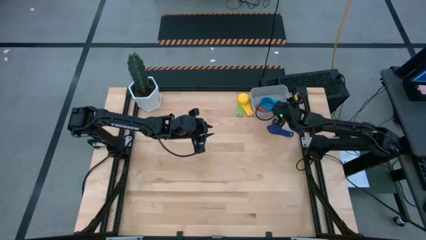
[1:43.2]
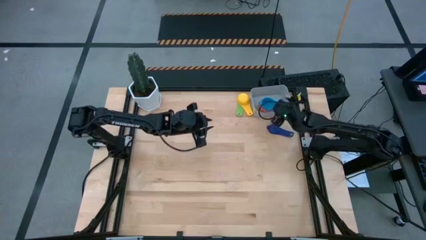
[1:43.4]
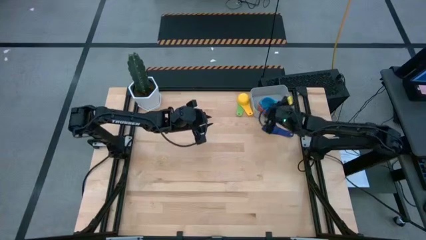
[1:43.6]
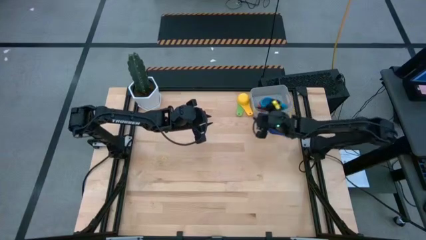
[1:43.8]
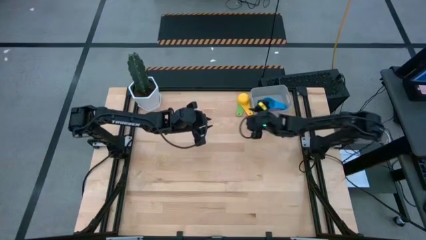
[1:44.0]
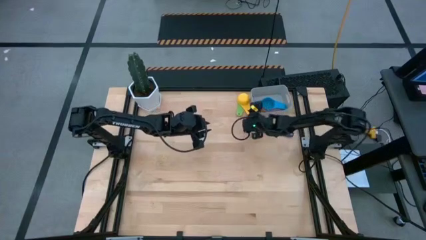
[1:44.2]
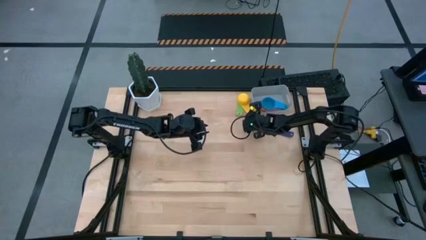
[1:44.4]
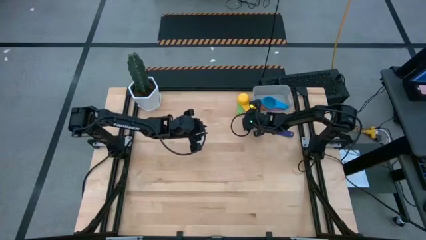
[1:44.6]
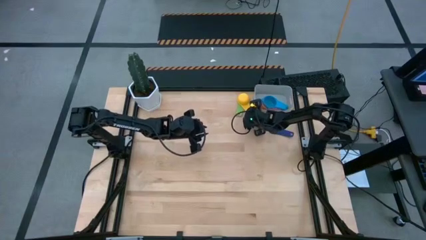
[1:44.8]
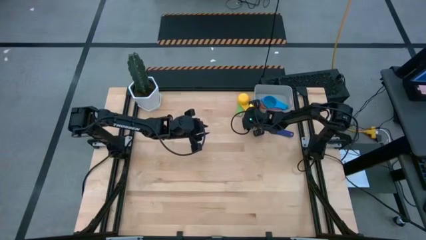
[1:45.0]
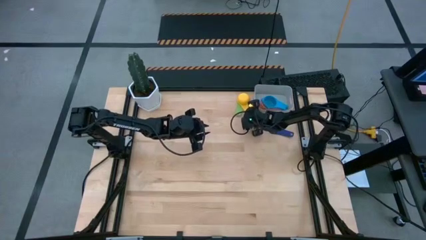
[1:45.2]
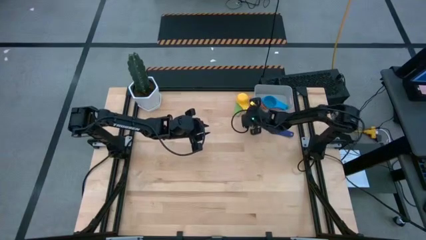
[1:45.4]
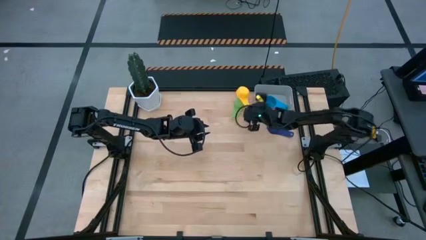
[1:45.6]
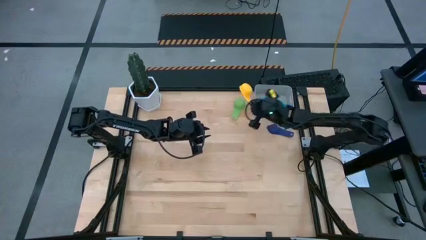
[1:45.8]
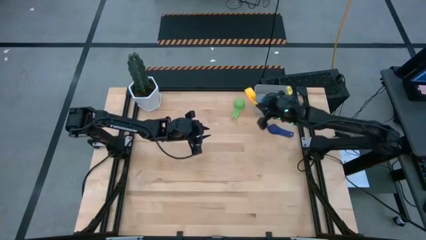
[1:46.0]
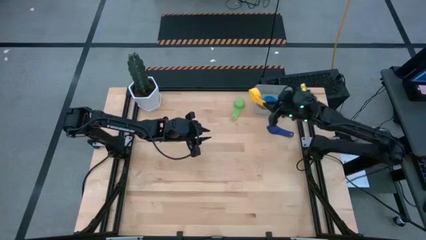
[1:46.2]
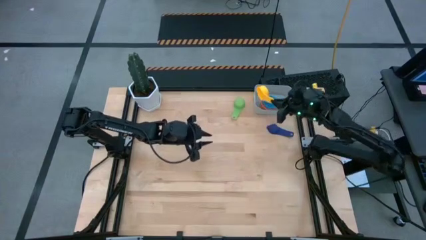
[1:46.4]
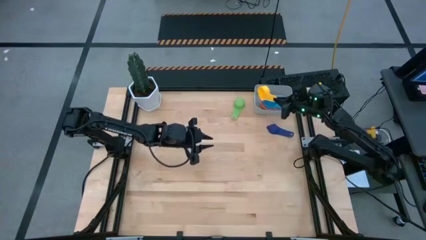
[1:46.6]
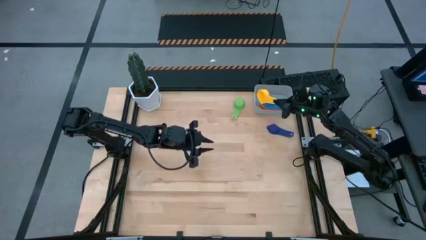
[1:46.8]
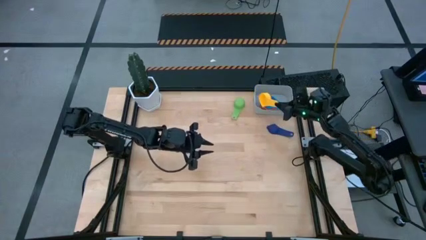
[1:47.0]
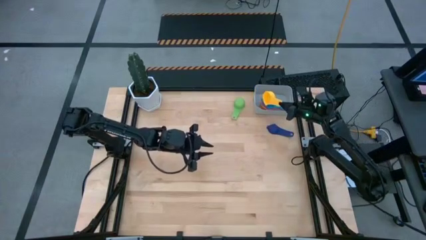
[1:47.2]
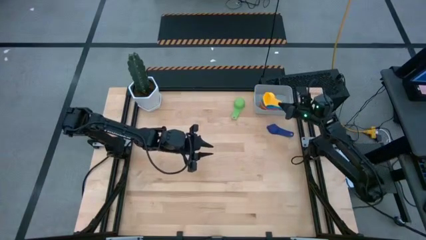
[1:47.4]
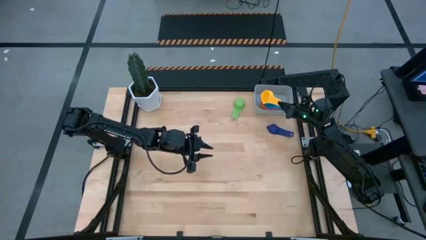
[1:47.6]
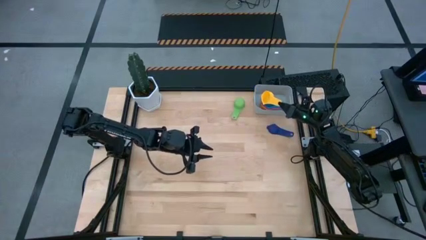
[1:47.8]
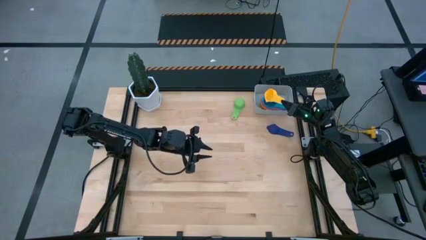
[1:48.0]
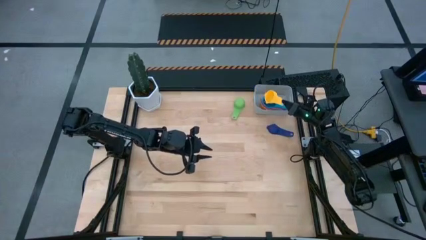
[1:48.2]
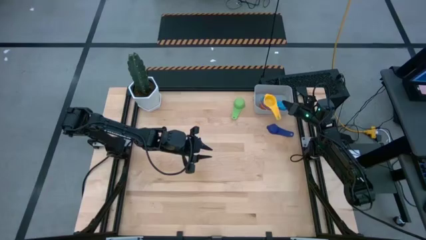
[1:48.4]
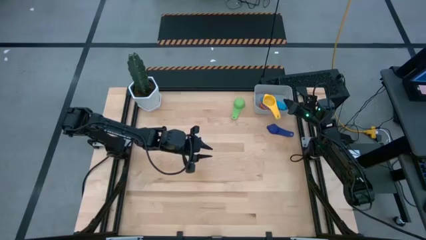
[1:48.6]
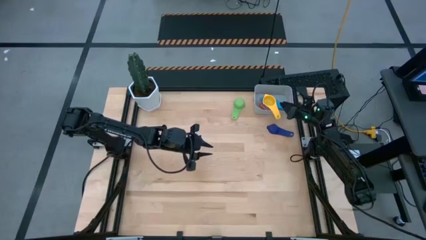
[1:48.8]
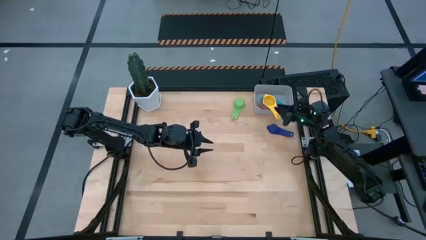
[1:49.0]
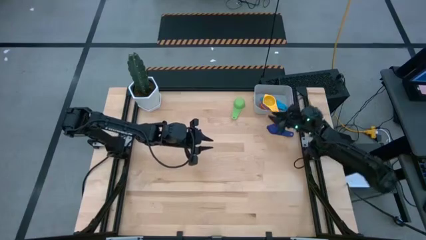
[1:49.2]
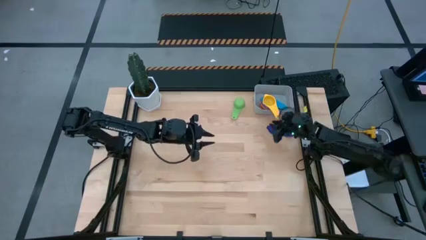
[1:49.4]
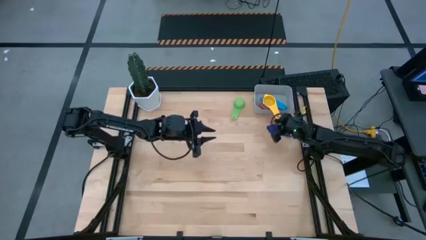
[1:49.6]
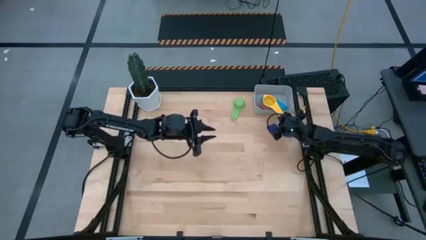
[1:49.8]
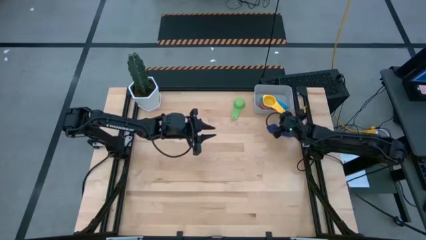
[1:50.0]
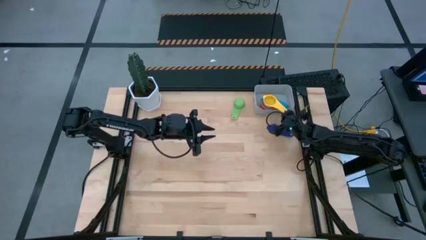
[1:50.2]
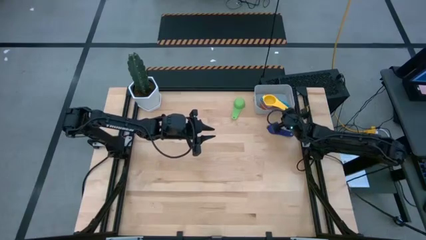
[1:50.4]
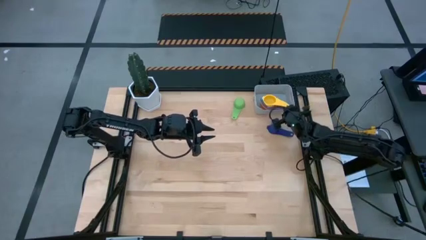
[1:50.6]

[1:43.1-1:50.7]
Task: Nest measuring cups in basket
Stack the yellow measuring cup on top of the light blue measuring cup into the gray bin

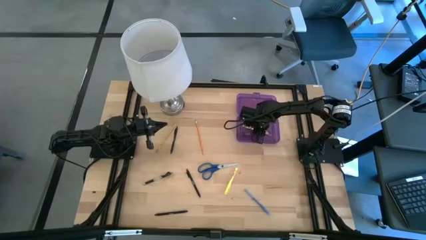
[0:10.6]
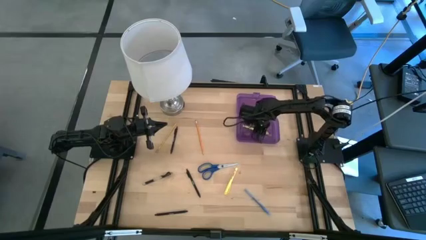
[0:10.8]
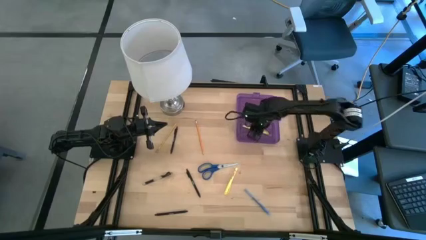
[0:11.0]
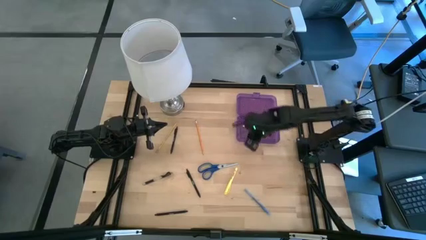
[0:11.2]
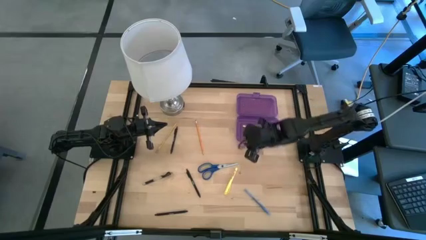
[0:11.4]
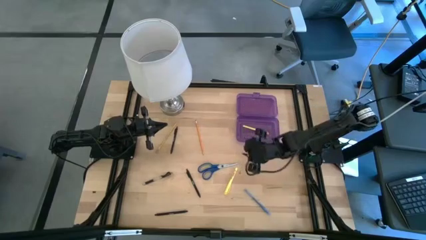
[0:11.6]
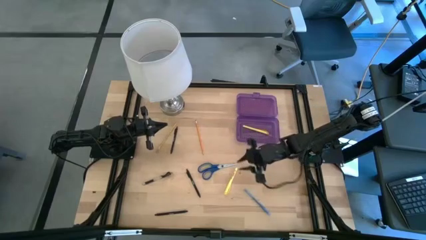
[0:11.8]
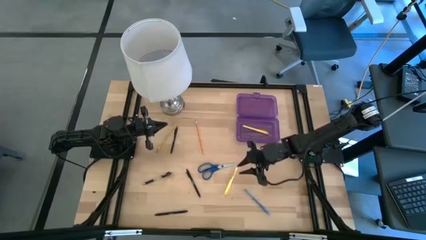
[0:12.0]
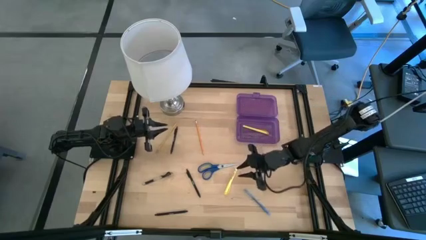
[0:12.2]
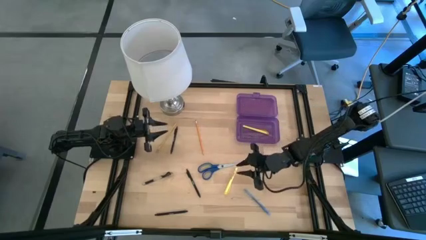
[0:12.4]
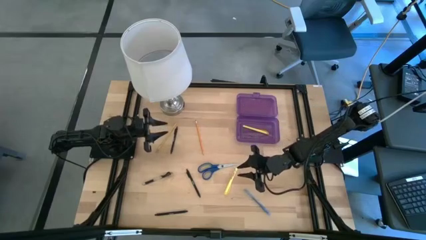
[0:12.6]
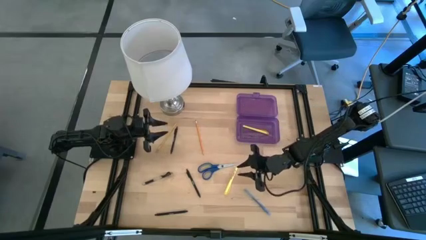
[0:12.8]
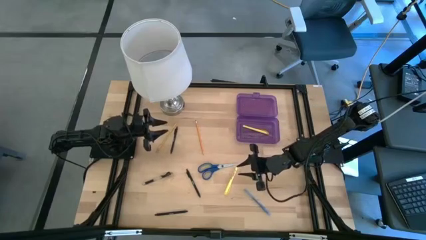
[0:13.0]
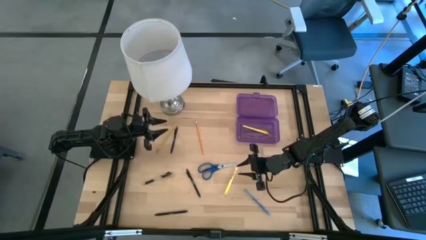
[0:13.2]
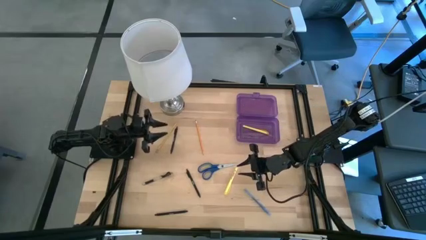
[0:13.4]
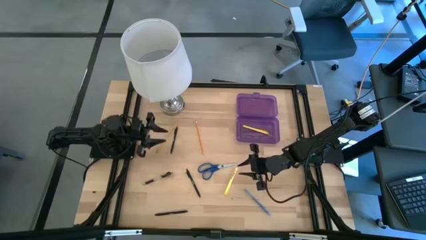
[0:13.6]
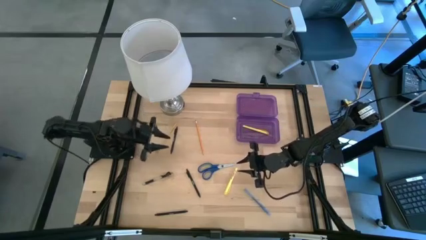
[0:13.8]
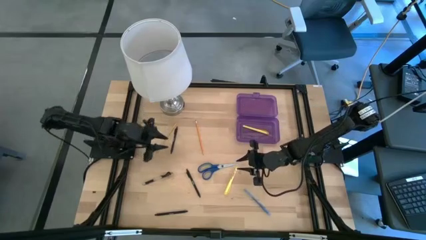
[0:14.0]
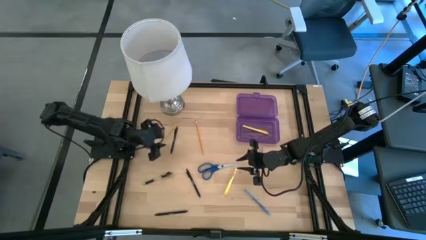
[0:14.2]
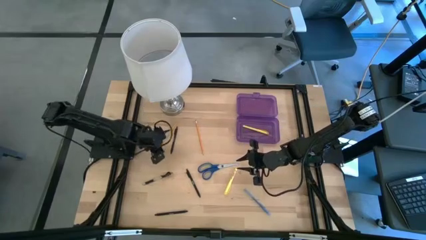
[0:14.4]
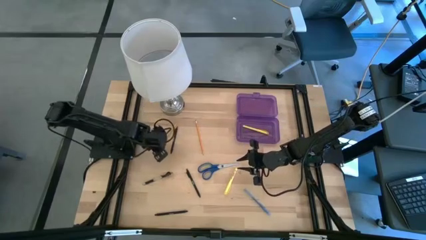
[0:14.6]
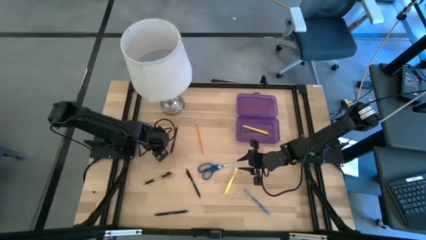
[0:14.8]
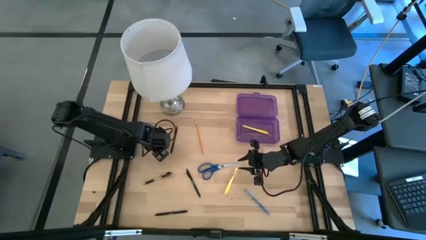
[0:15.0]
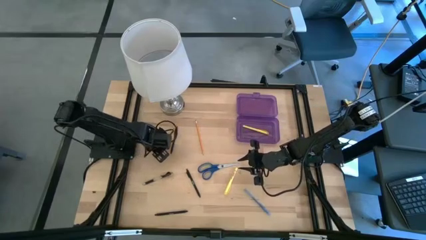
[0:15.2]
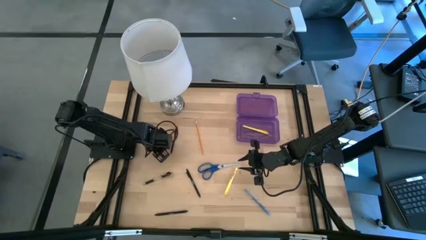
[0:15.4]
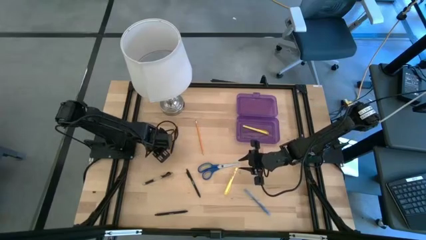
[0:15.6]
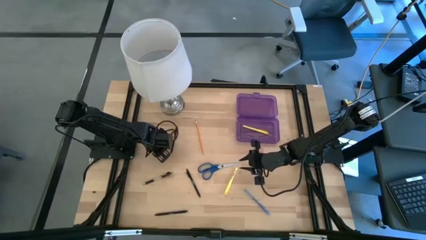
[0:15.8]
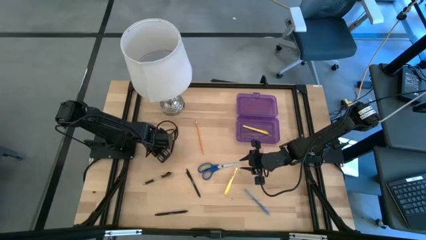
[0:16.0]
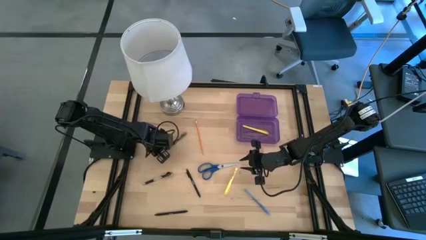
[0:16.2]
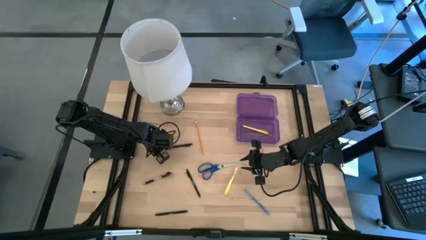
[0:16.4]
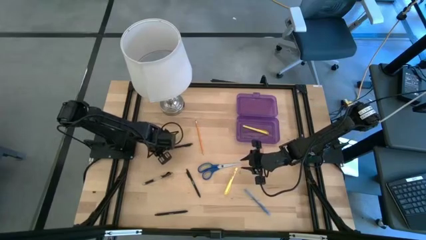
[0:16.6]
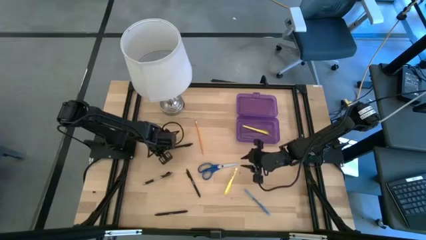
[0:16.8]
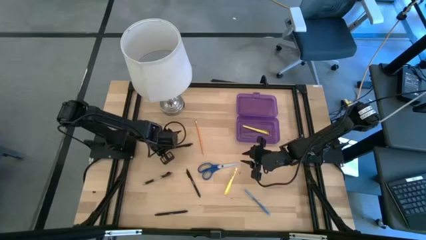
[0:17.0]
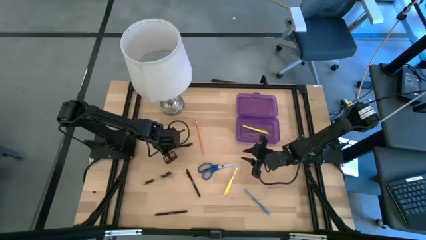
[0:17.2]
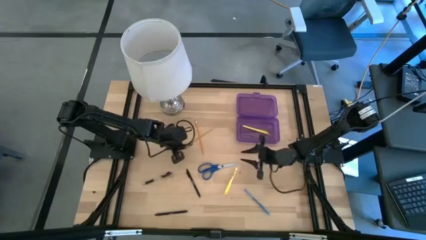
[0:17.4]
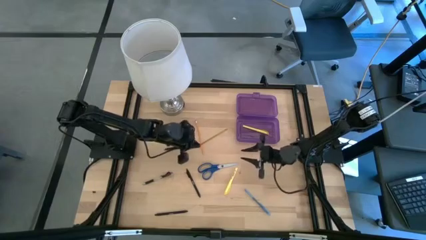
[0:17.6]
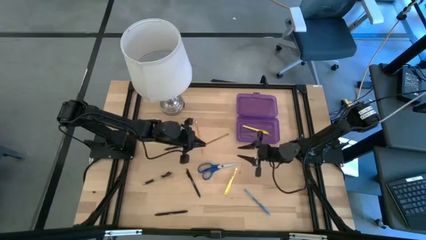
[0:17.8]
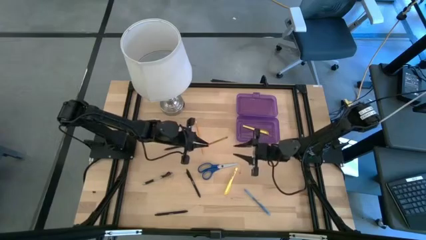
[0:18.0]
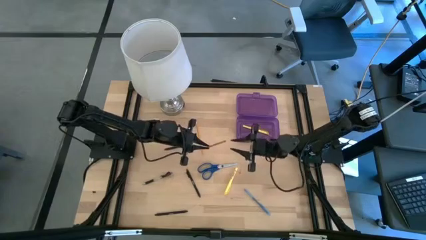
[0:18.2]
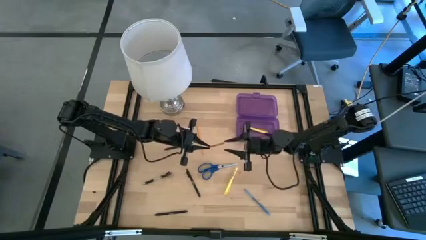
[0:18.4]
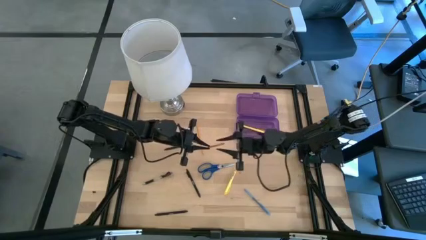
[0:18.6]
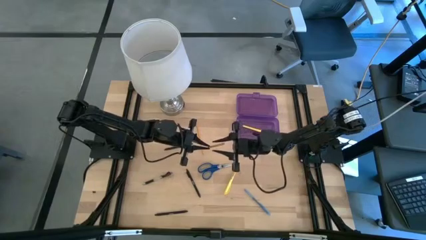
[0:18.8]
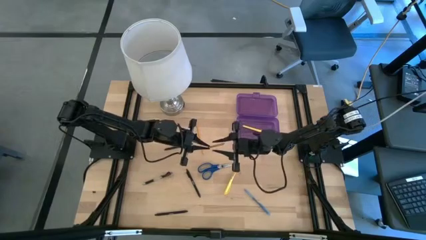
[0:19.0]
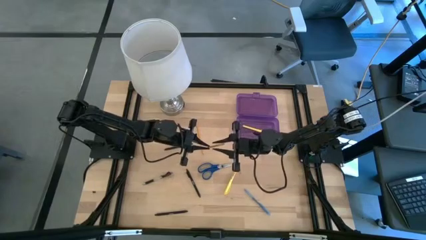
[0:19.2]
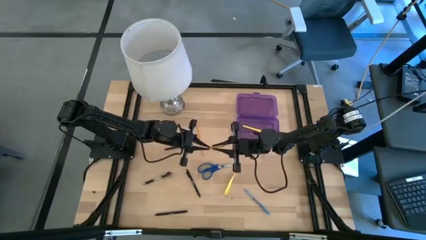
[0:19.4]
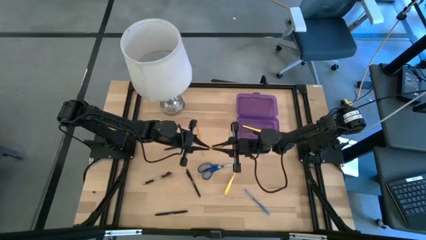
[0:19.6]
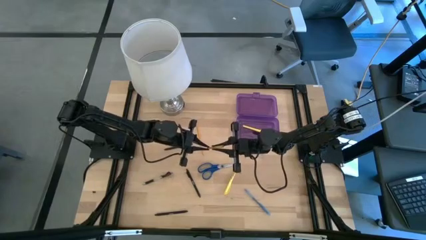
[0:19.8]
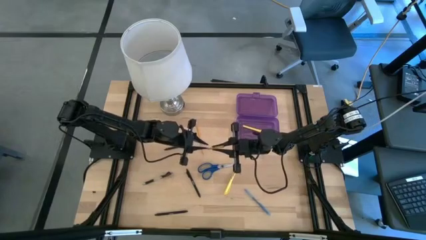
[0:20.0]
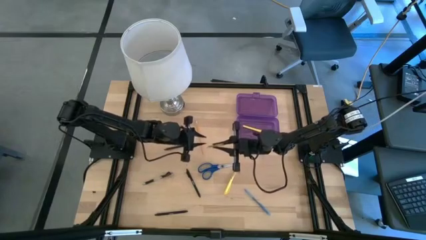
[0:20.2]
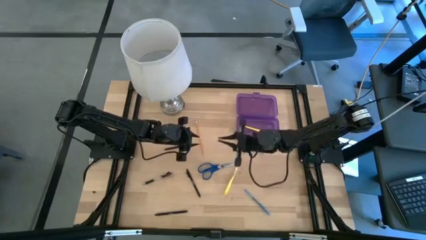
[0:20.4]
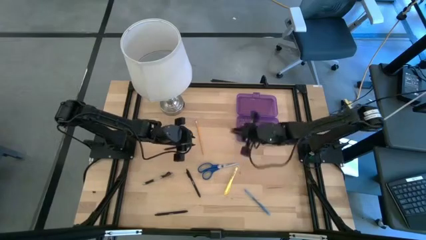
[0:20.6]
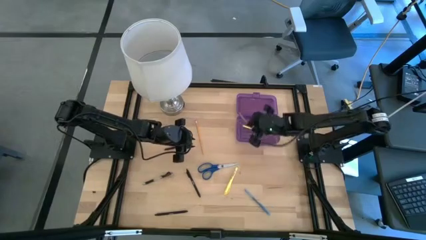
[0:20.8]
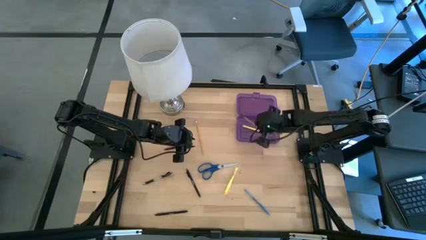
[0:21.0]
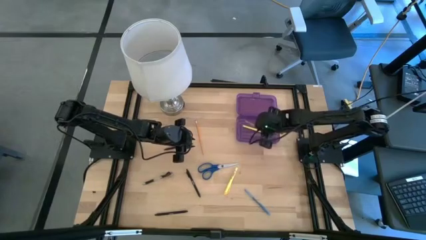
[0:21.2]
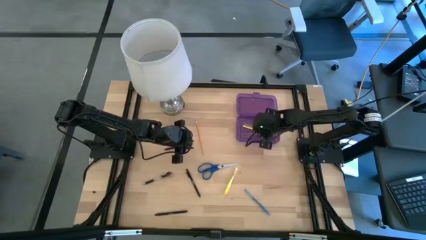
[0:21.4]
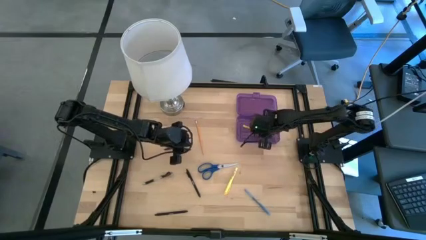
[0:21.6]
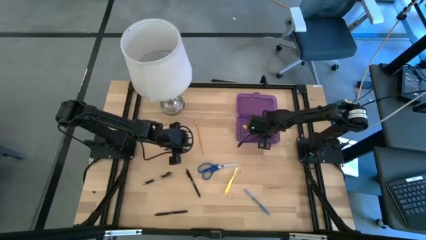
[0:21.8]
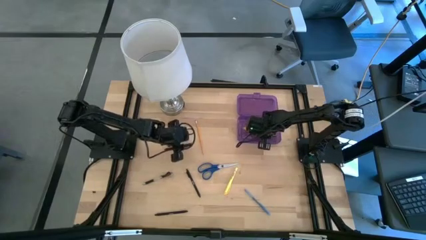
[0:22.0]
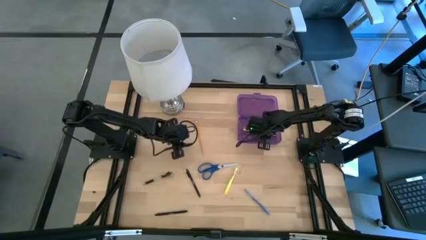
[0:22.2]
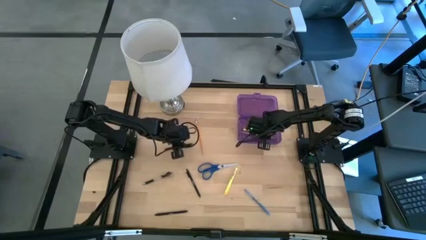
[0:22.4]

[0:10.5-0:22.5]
Task: Pick & place school supplies into a supply box
Put the left pencil into the purple supply box
